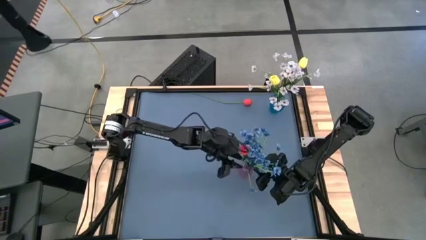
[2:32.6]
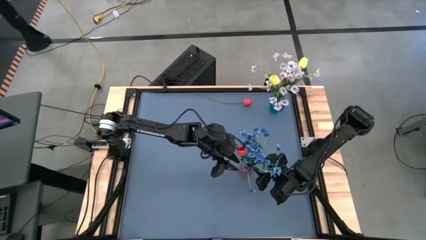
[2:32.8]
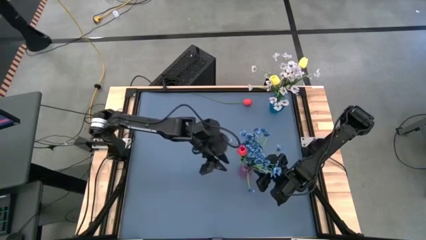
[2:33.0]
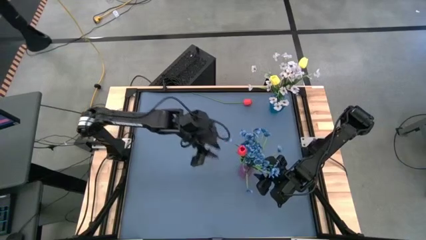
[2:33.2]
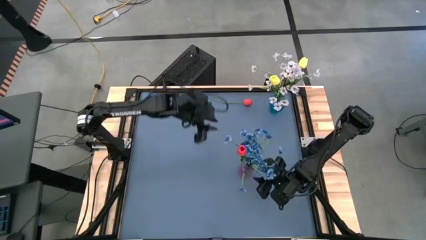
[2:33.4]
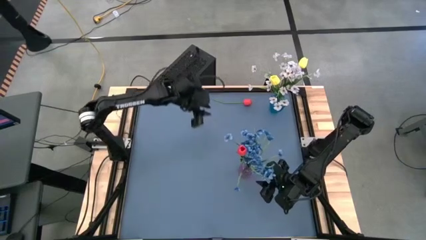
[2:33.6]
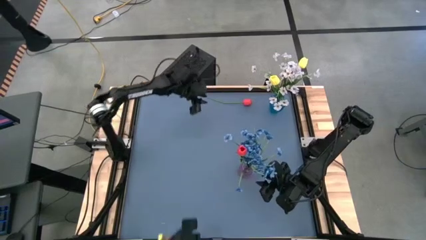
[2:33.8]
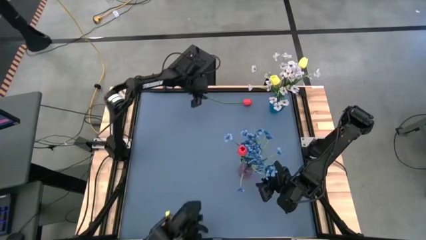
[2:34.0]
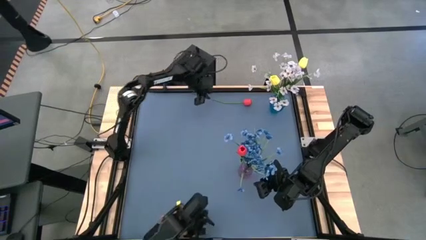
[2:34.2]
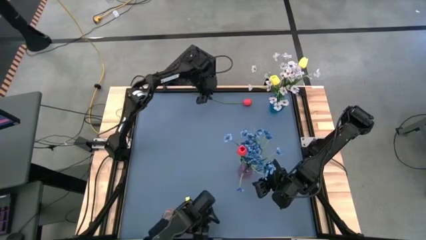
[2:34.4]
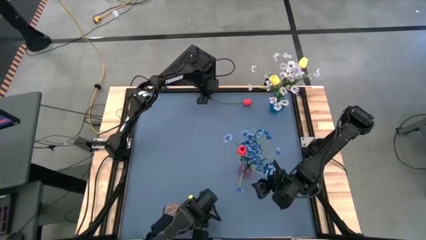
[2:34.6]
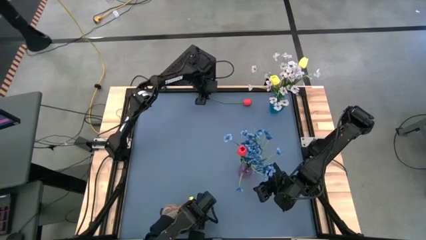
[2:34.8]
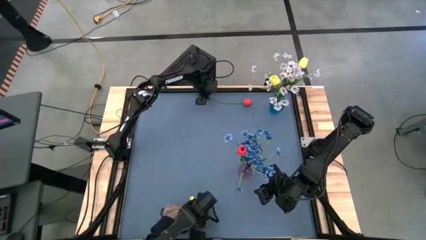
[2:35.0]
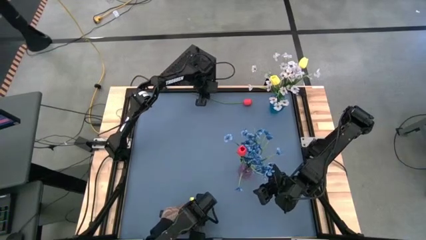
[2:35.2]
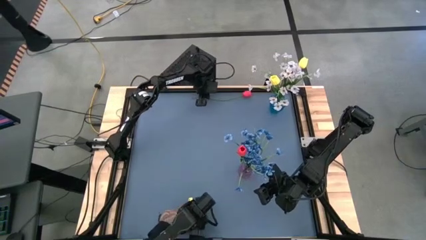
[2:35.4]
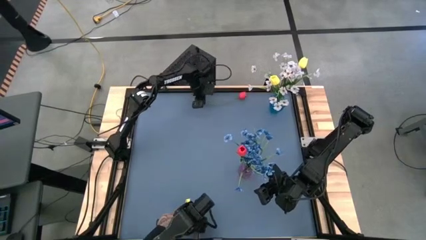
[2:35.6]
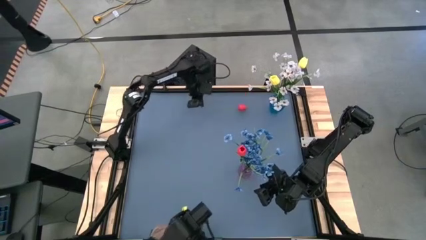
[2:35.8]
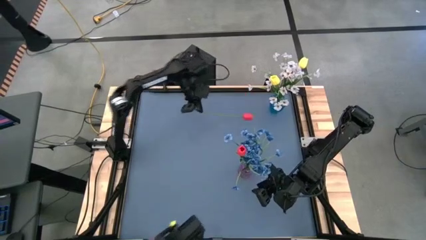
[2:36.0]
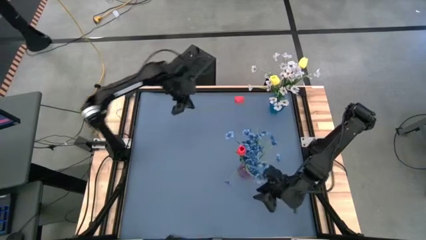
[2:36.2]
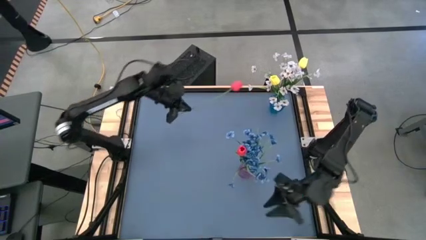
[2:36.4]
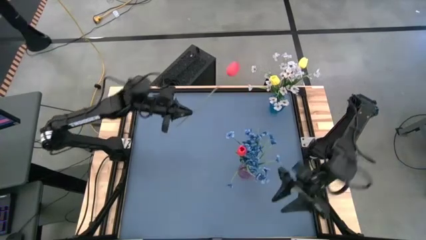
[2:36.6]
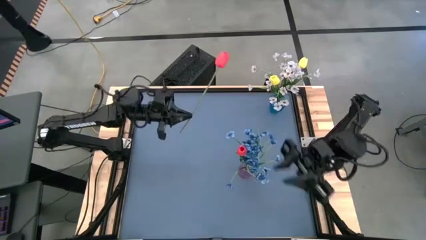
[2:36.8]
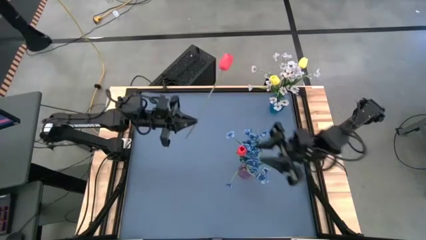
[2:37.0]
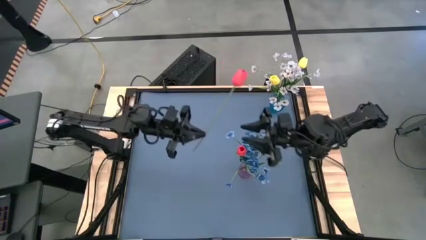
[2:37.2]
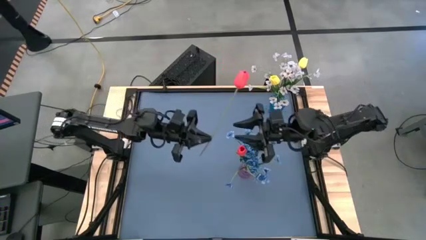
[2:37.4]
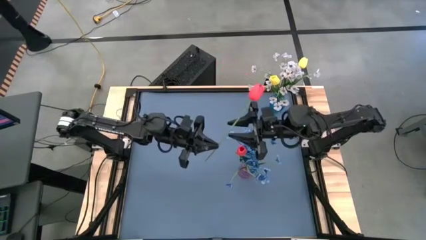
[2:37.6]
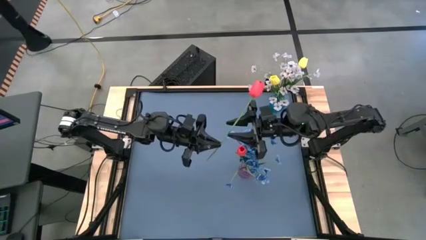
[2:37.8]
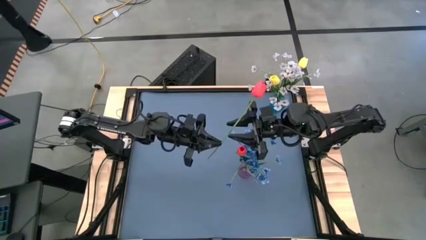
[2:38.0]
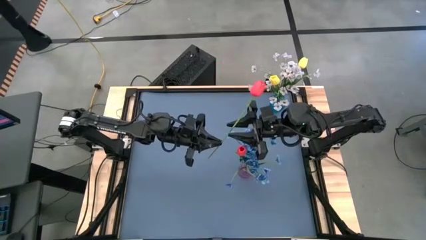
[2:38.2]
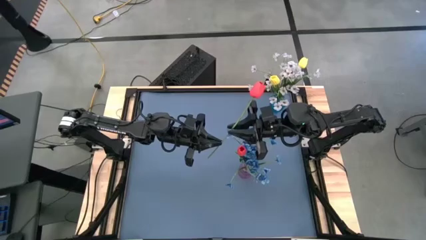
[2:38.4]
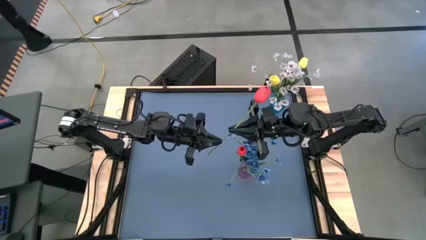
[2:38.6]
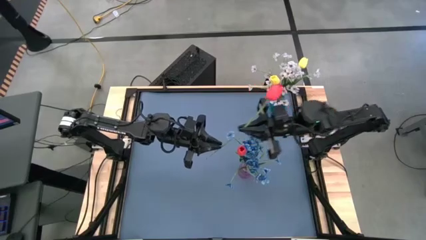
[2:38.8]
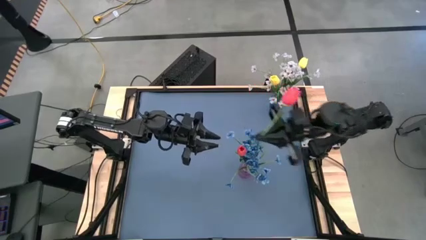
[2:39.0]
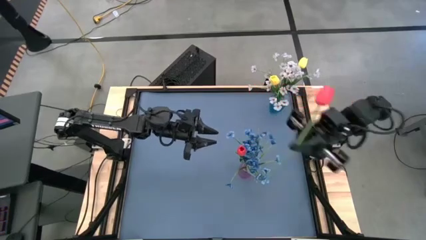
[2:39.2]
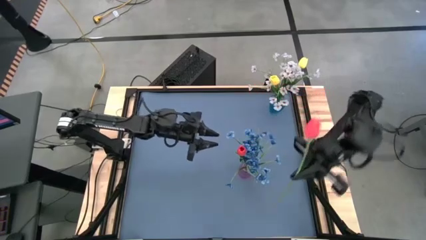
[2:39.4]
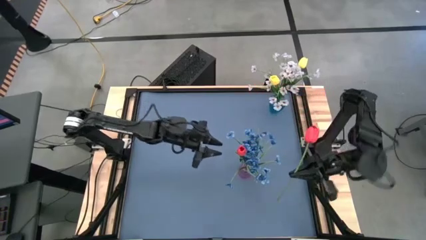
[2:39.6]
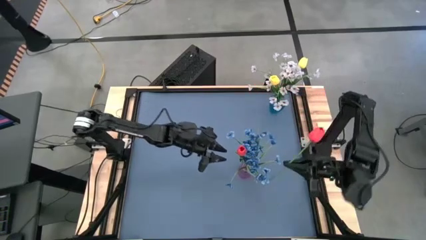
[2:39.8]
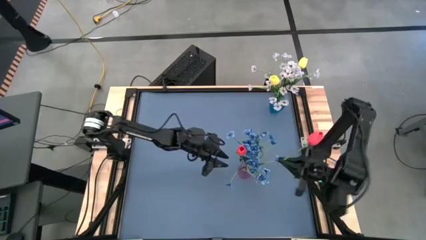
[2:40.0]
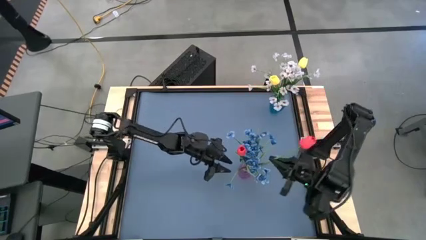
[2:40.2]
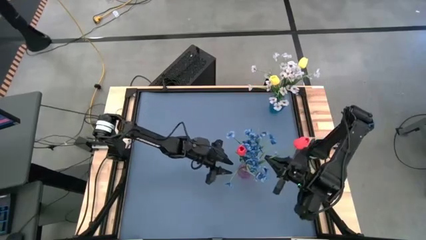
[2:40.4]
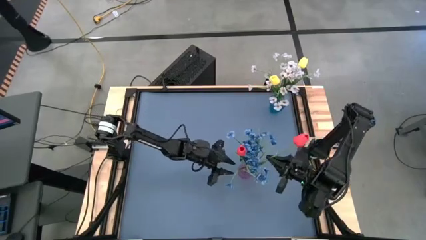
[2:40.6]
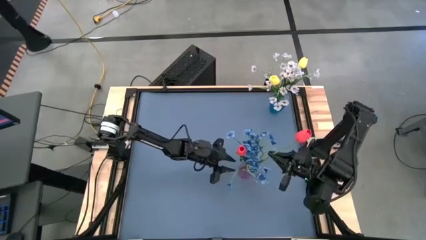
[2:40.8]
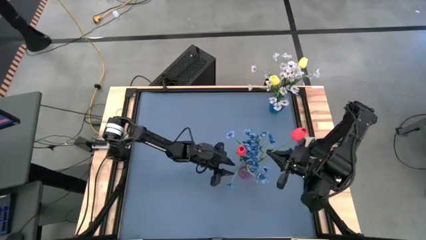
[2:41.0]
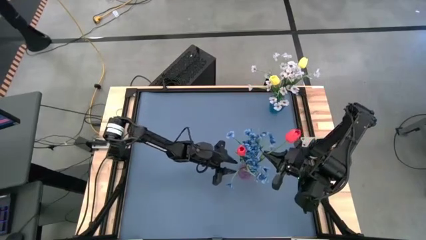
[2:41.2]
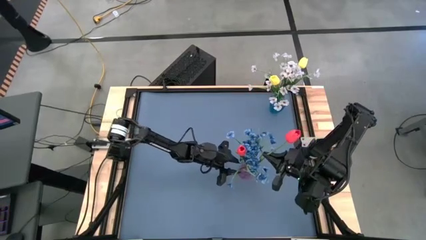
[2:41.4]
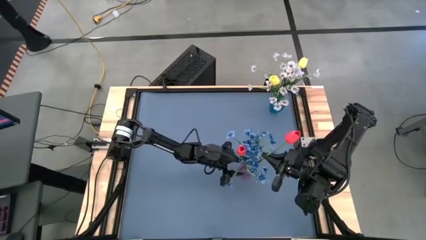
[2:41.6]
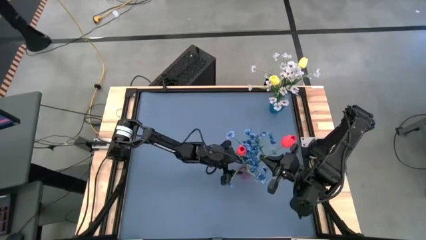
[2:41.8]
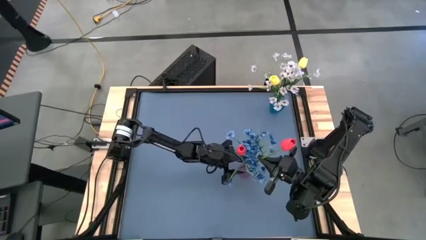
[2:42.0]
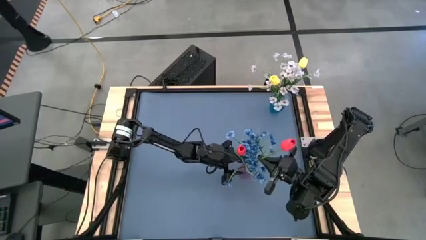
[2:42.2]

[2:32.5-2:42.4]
Task: Sort flowers into vase by color
Put the red flower into the violet vase

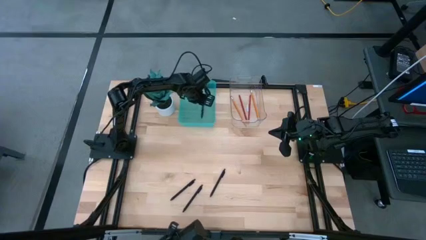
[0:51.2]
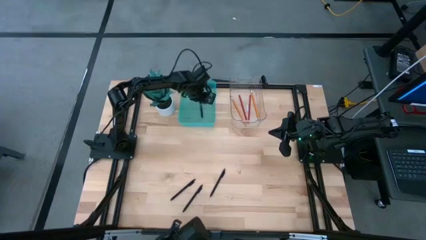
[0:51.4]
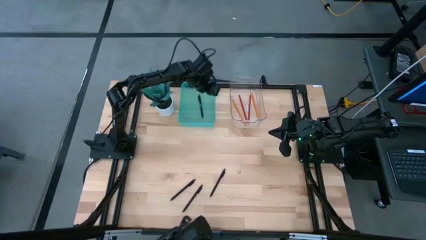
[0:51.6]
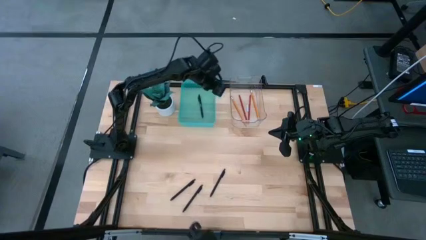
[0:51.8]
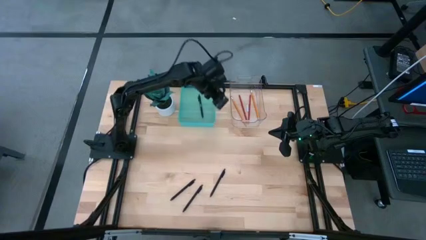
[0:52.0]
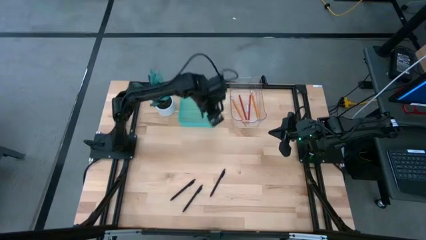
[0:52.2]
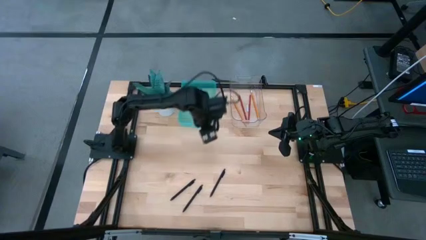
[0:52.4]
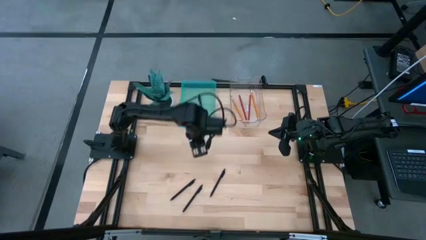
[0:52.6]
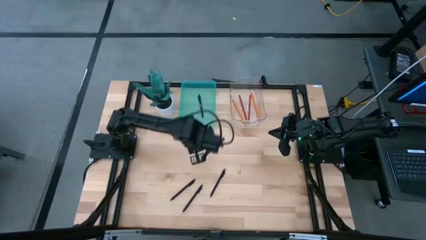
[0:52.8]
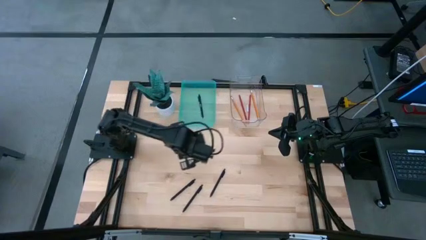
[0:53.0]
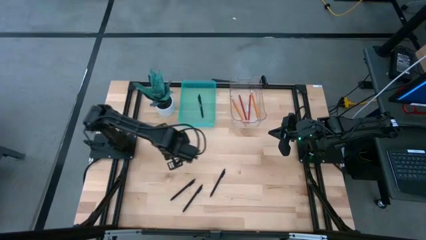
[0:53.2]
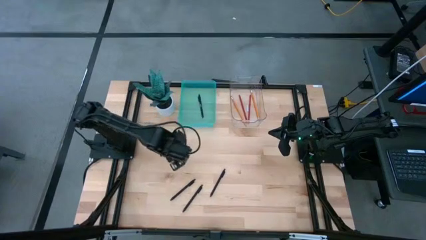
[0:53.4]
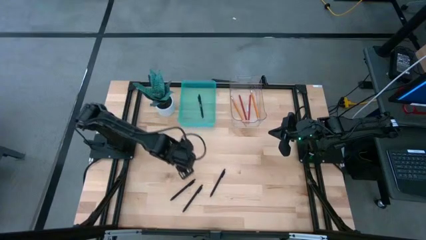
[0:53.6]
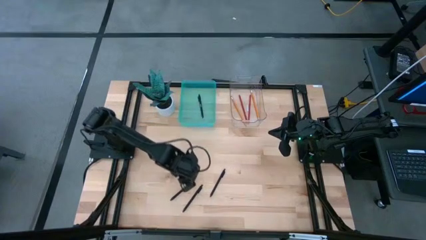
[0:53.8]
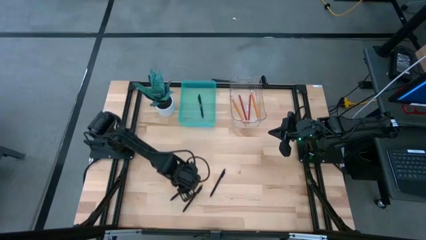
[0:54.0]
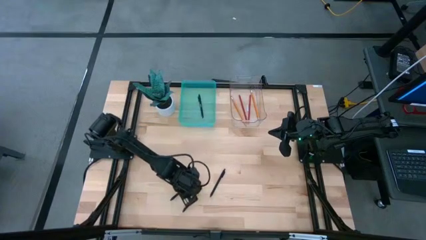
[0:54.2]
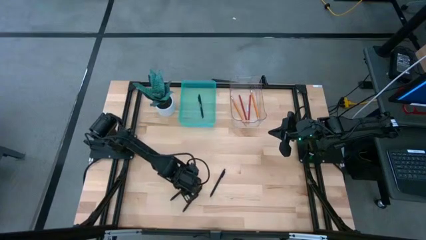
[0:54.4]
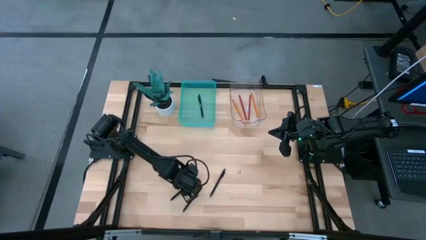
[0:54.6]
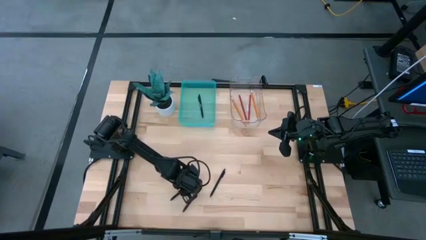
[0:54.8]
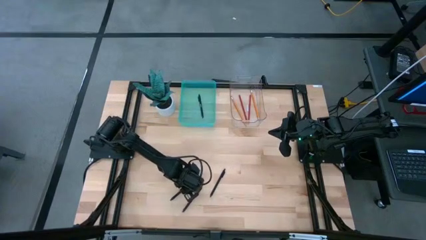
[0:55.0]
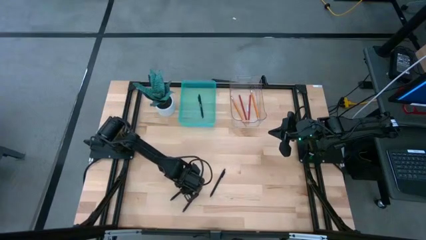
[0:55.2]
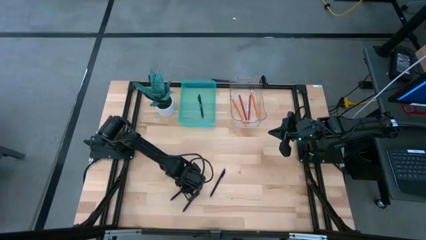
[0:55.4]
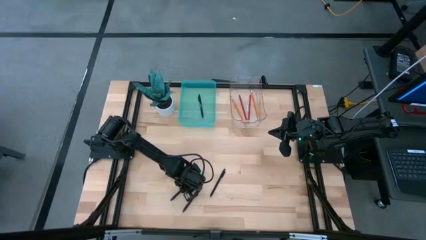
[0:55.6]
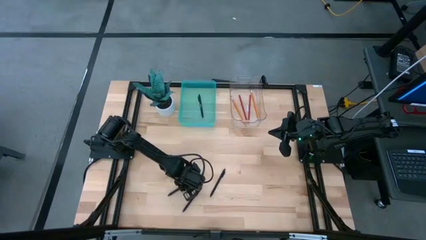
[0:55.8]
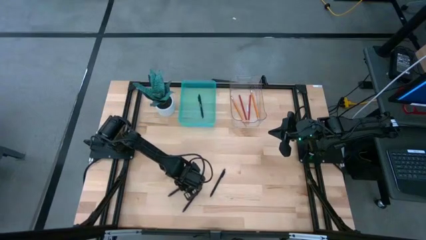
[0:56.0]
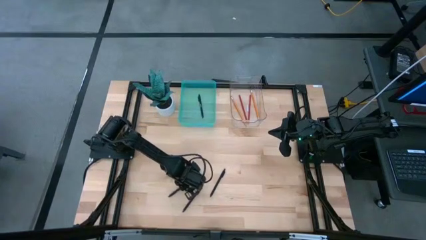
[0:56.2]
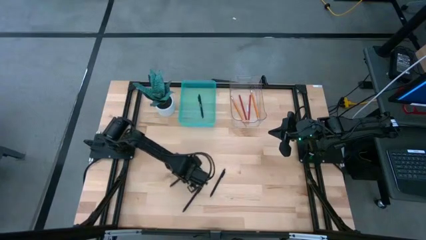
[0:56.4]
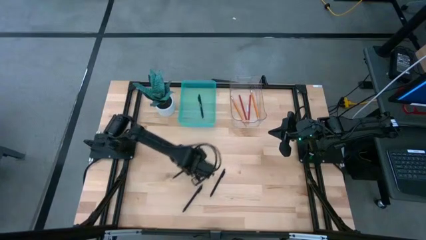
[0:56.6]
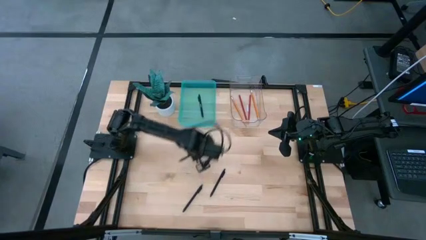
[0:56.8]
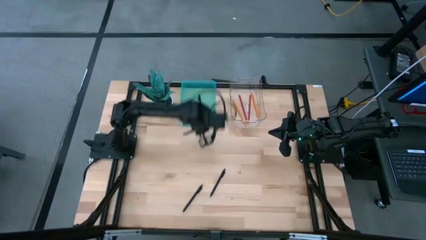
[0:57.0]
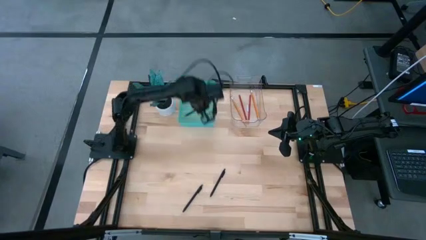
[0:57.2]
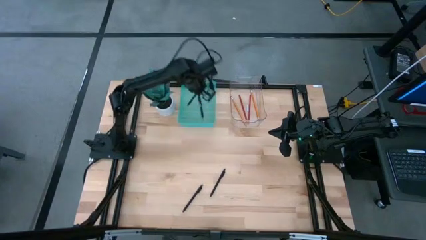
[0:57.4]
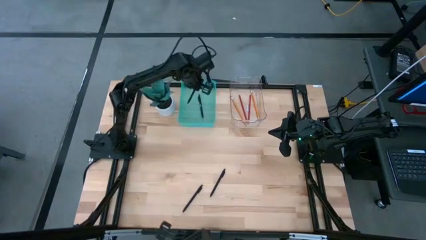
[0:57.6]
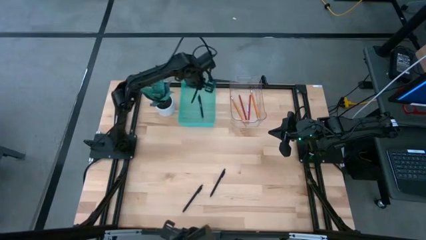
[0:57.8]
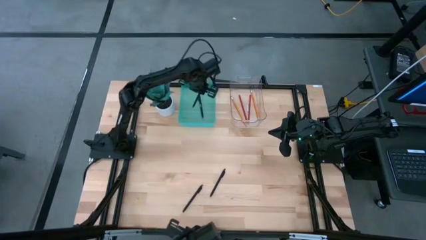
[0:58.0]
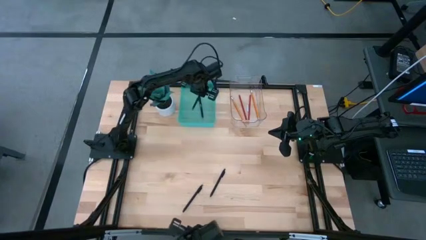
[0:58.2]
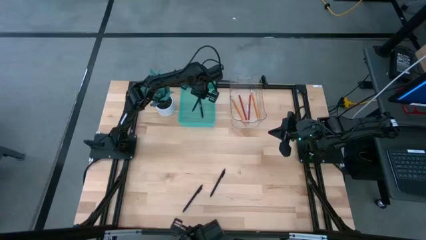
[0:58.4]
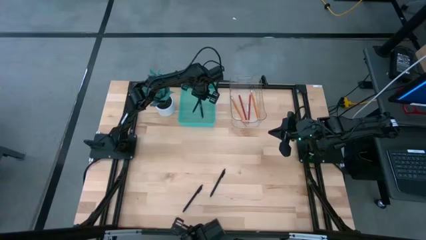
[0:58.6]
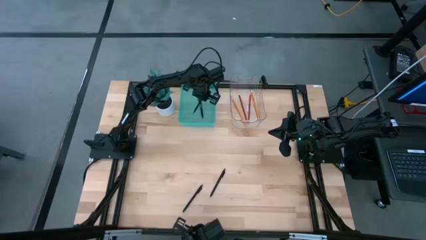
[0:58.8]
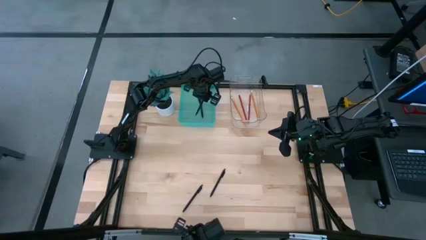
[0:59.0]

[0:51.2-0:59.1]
Task: Sort pens & pencils
Put the left black pen into the green bin
